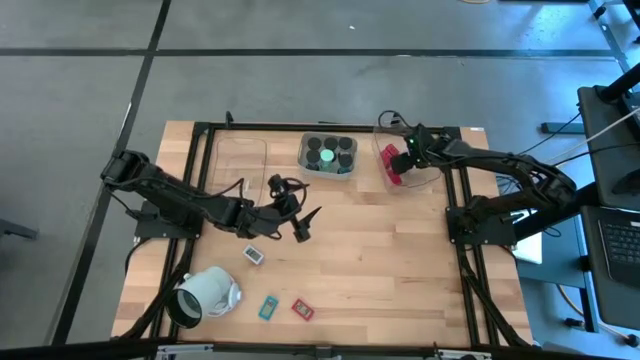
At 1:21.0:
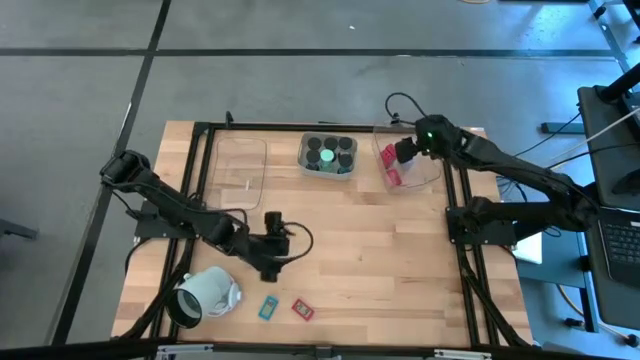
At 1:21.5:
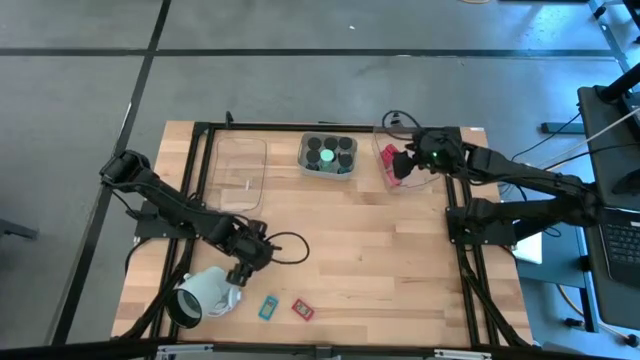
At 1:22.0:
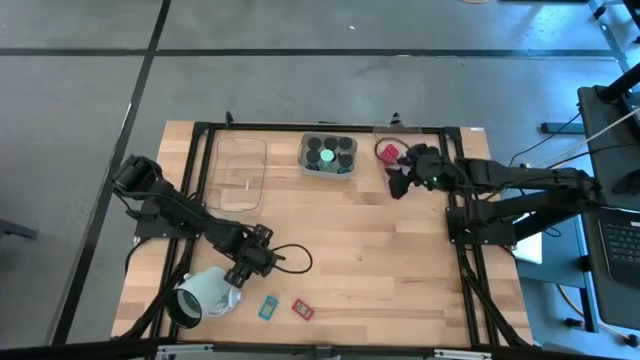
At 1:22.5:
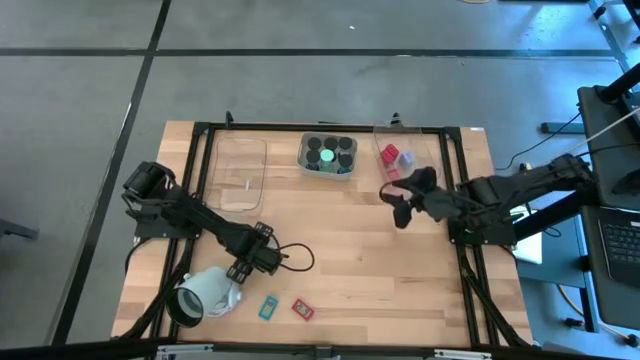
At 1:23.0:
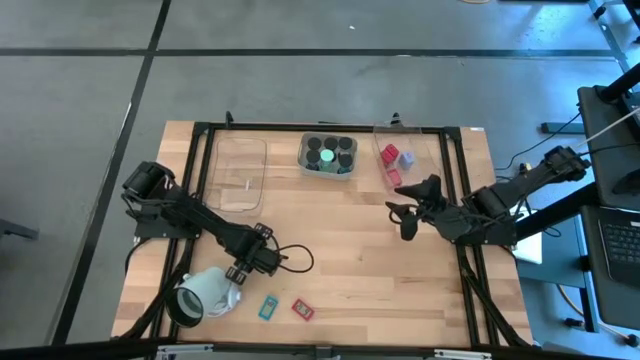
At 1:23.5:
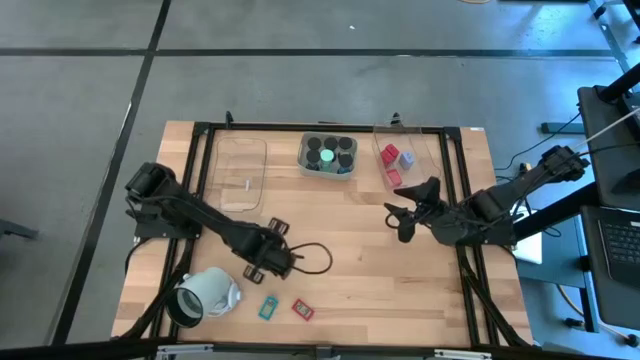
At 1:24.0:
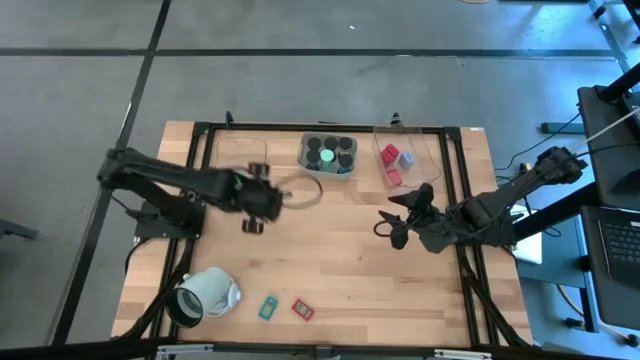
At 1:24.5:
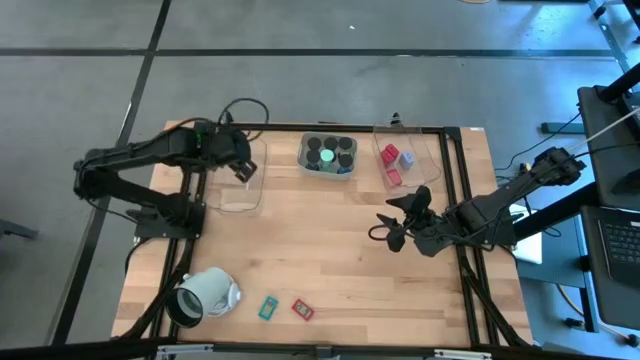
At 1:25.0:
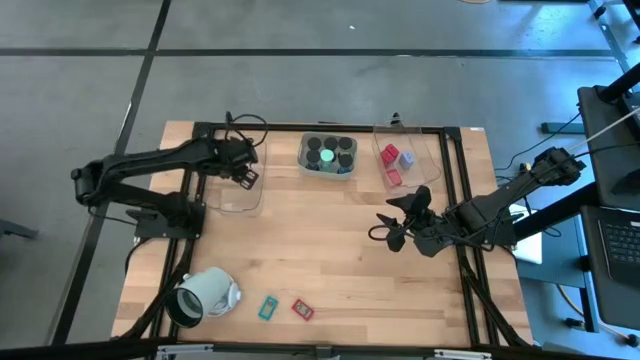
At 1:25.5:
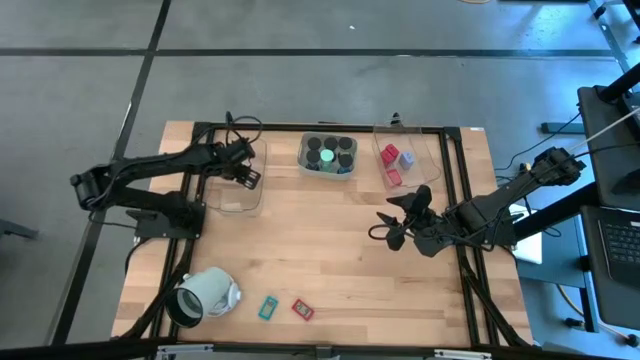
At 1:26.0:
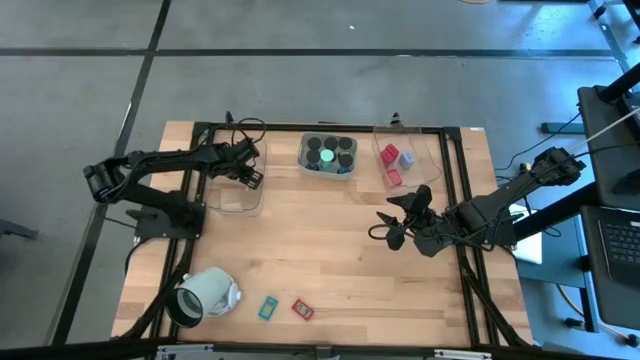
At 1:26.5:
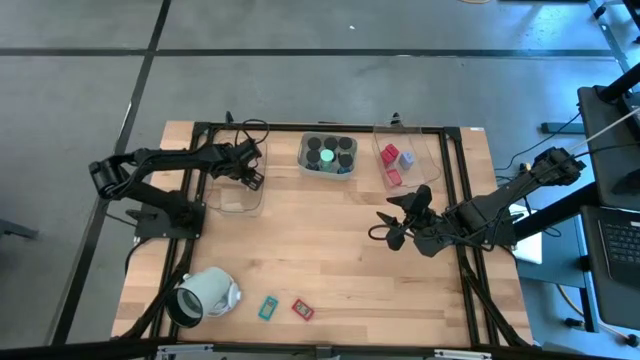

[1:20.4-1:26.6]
Task: Pick & Place Office items
Put the white digital timer into the left transparent bin

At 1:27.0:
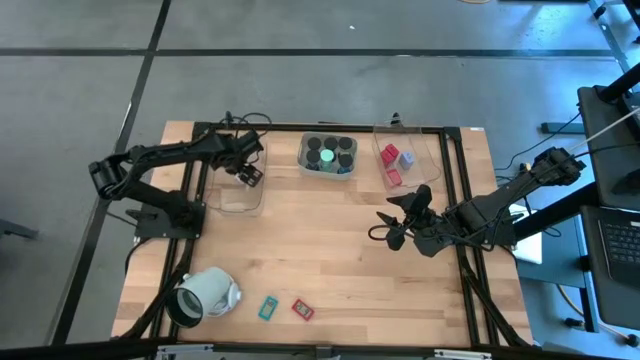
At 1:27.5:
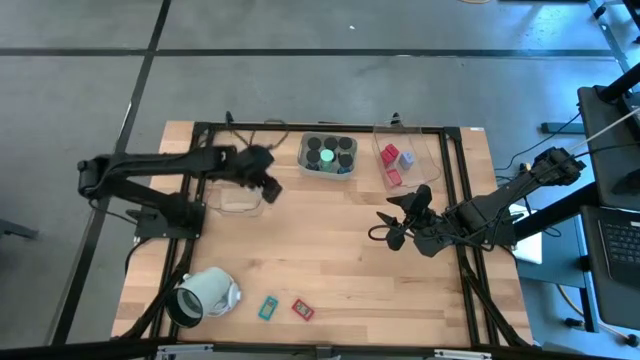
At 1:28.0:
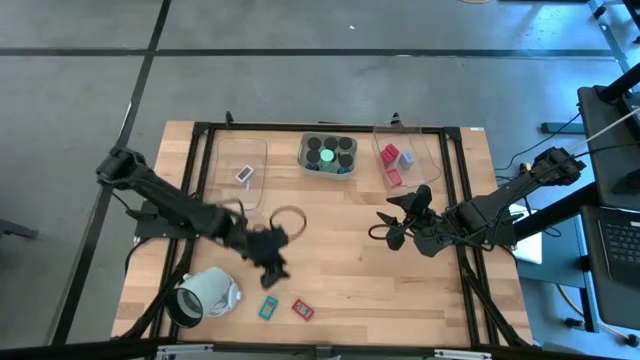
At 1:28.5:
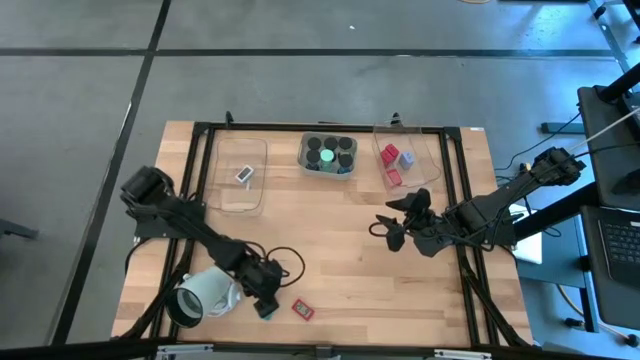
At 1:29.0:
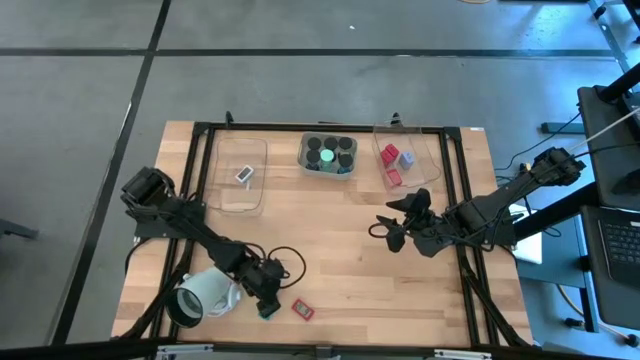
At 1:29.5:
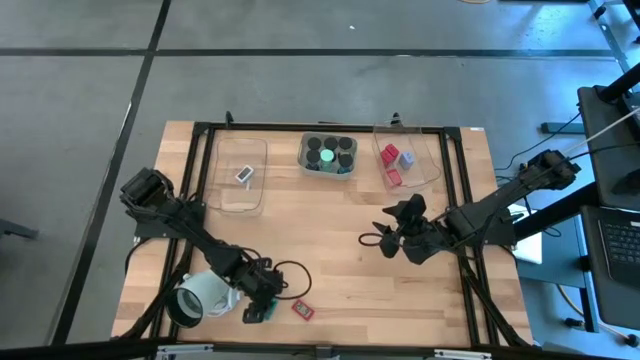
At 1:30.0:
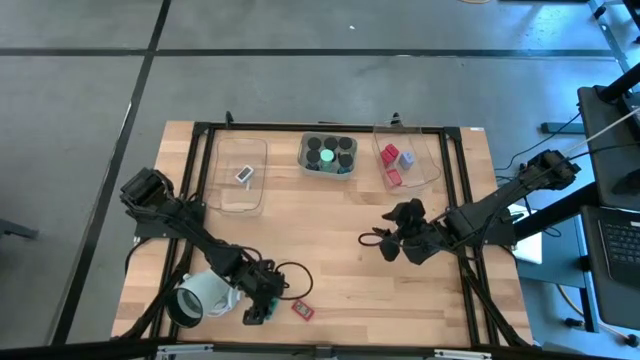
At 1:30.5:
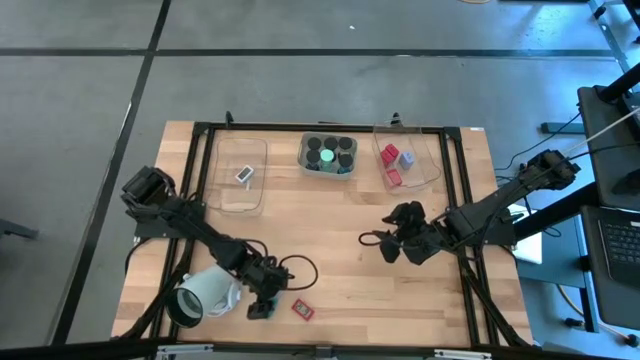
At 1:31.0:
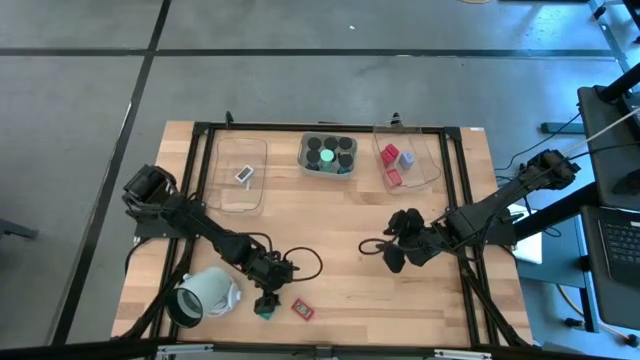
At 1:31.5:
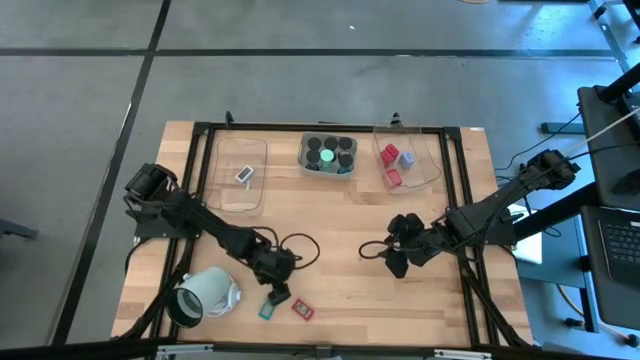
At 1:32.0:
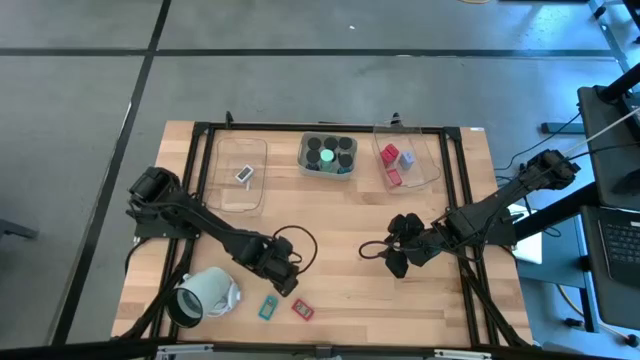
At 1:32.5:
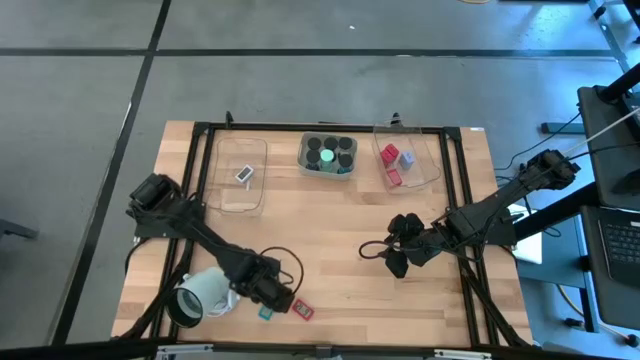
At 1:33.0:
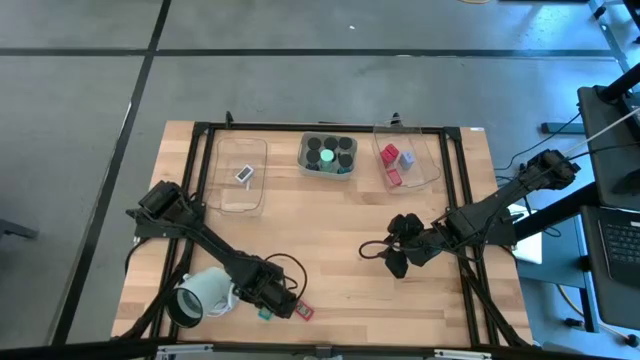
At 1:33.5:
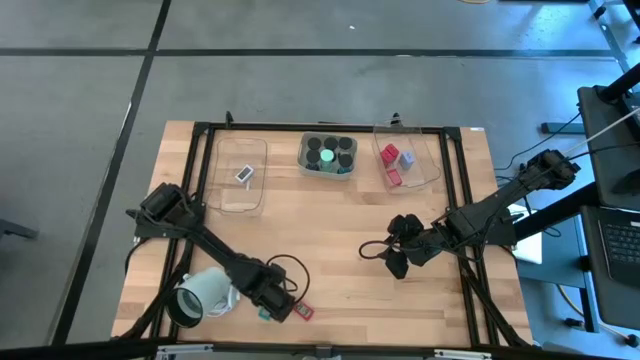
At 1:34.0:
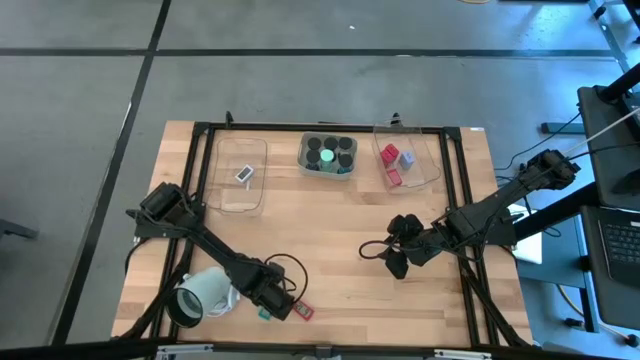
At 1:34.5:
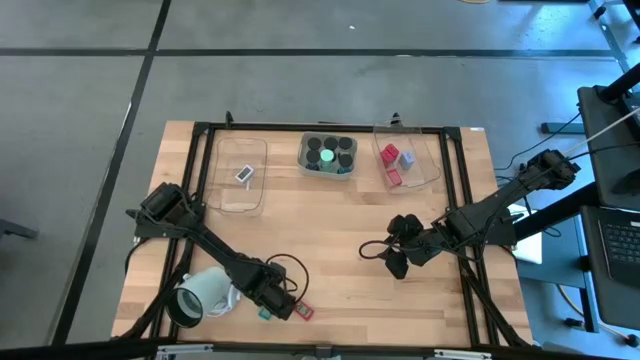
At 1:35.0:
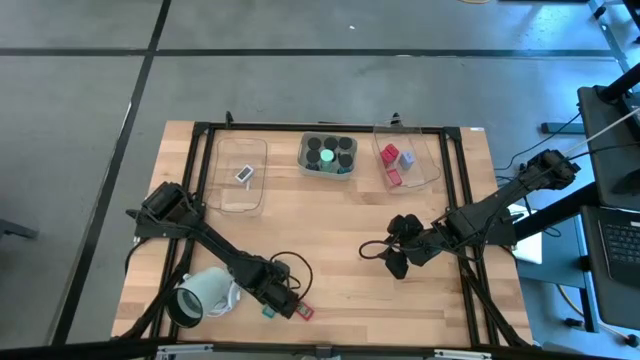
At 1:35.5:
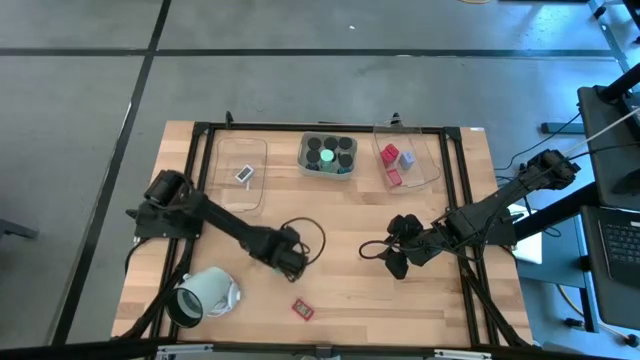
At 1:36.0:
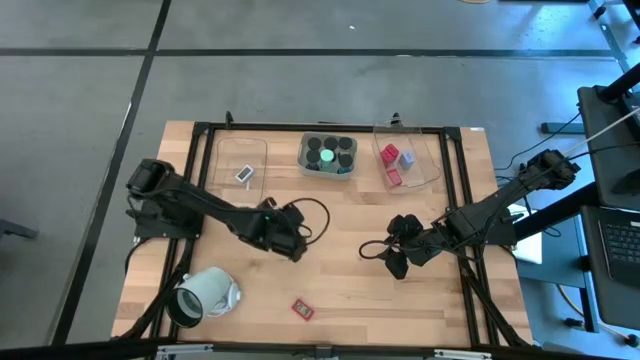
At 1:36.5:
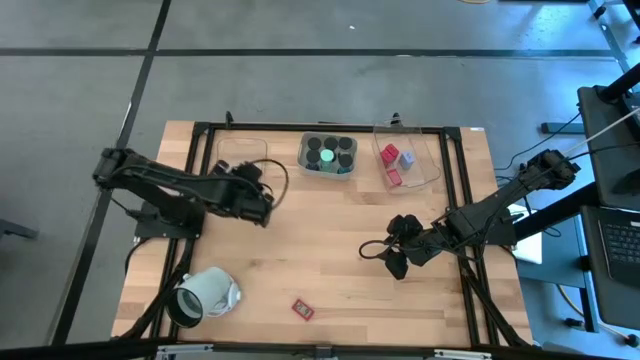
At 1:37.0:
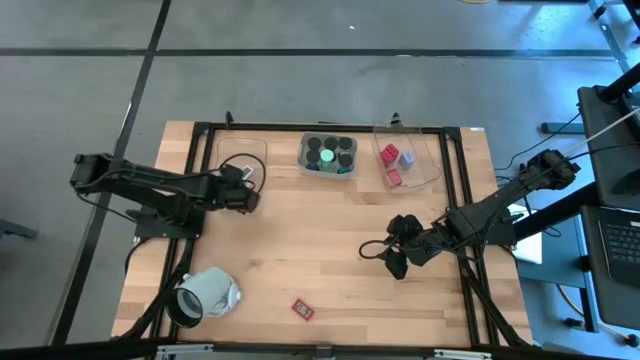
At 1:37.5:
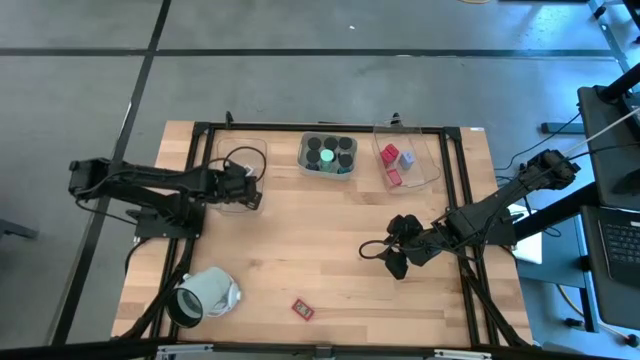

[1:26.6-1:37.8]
Put the blue digital timer into the left transparent bin

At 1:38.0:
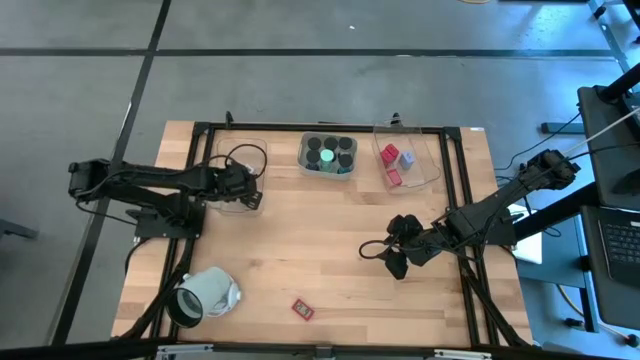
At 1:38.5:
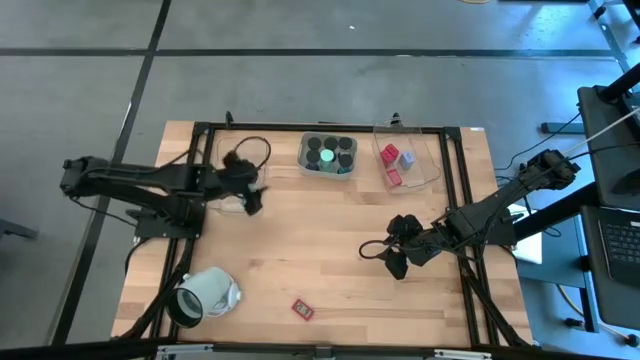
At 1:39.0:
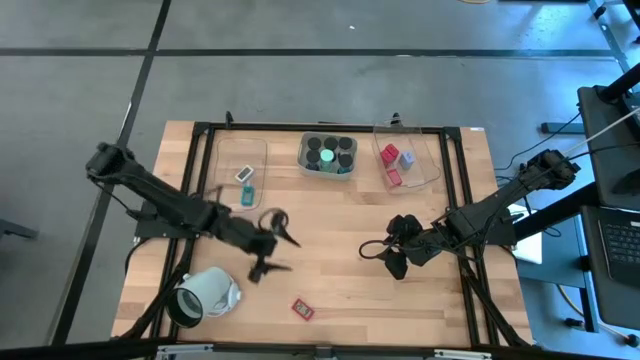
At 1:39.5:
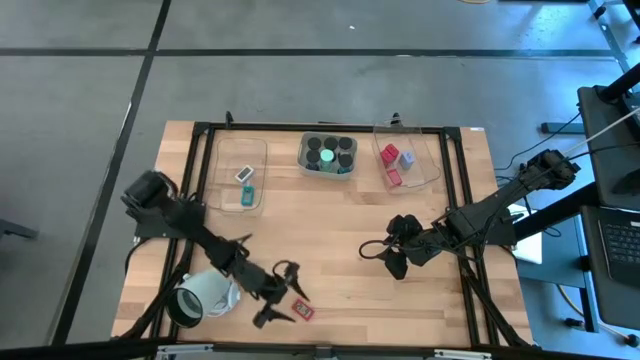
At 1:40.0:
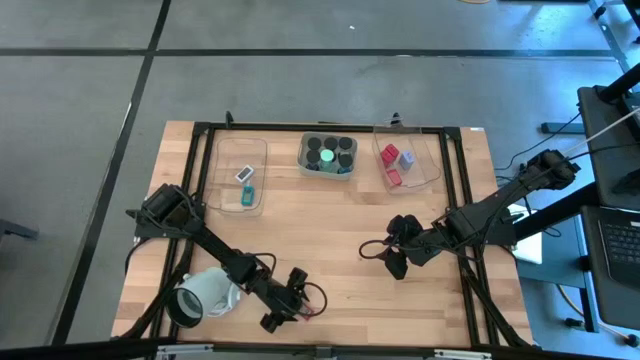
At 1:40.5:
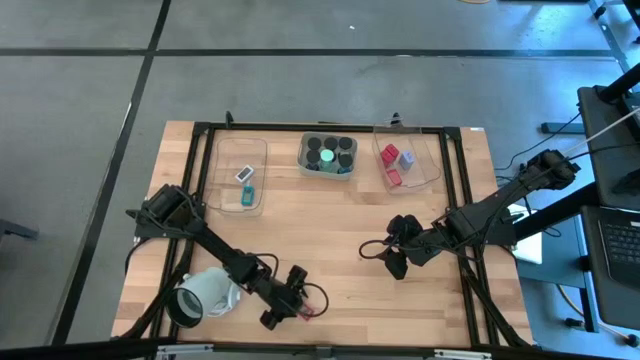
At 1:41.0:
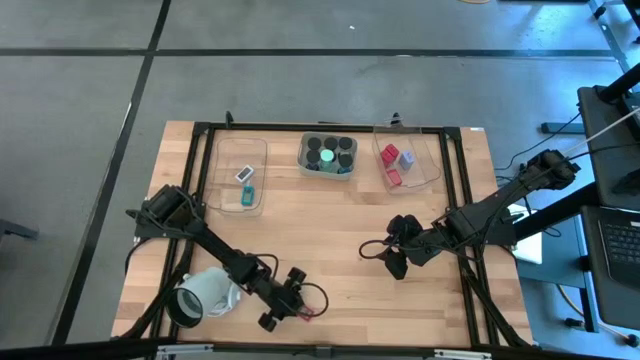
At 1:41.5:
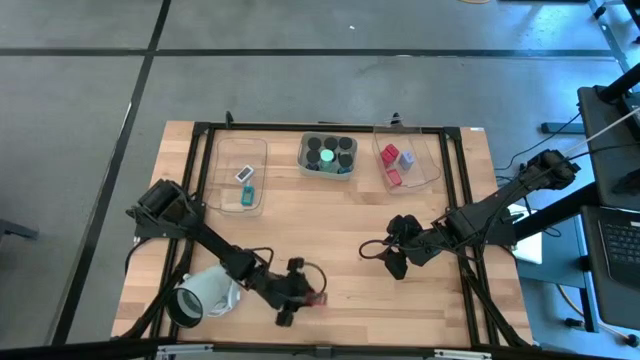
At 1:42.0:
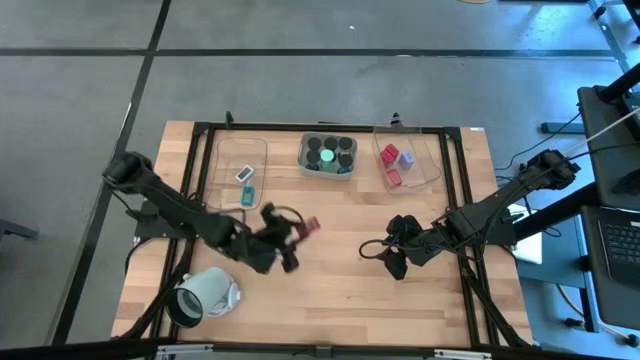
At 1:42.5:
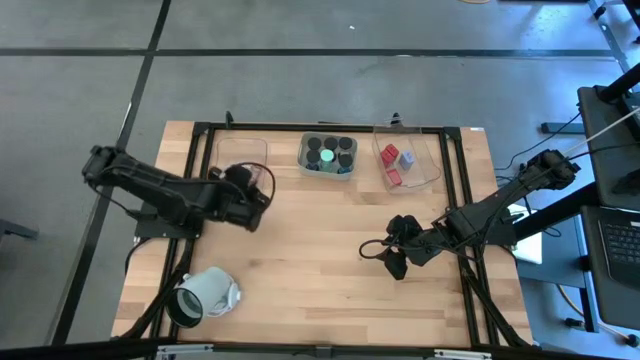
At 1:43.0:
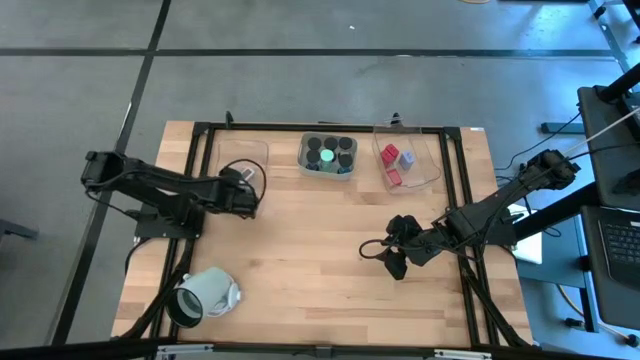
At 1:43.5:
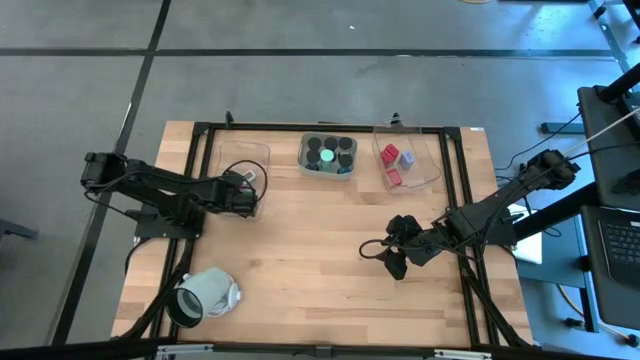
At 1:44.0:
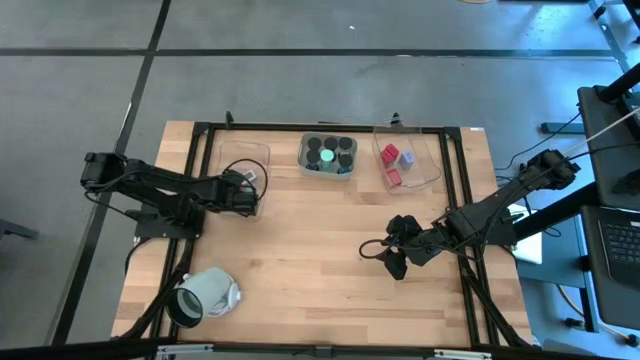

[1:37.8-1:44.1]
Put the red digital timer into the left transparent bin
